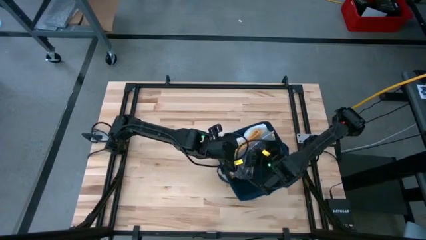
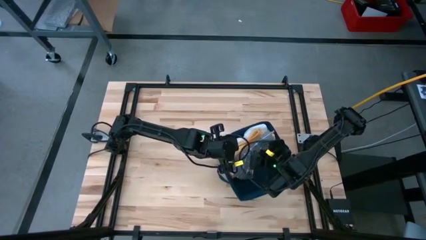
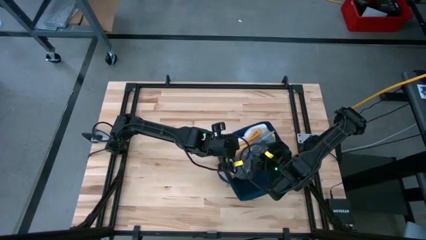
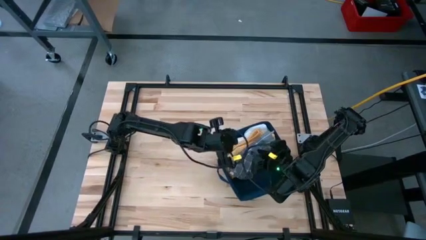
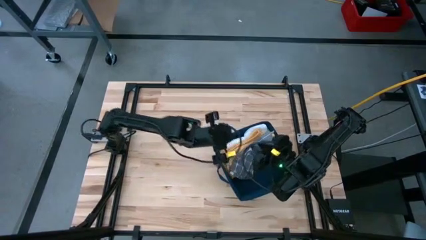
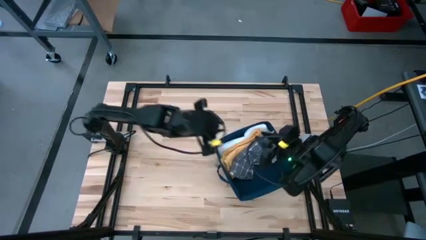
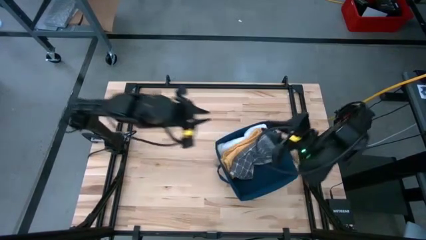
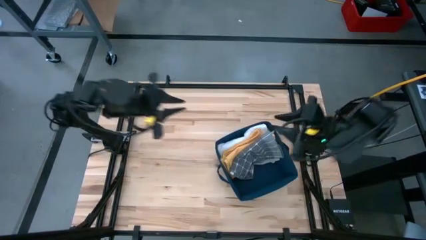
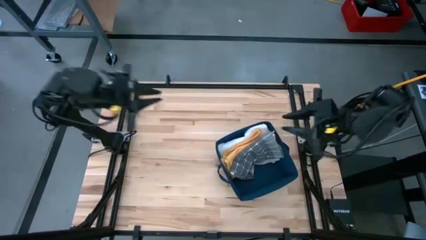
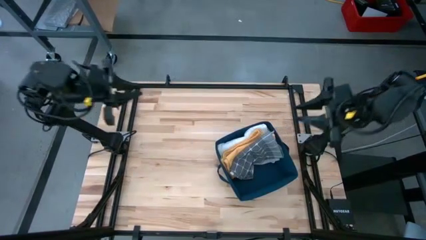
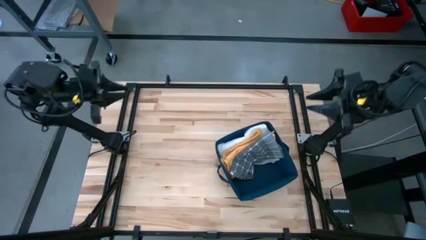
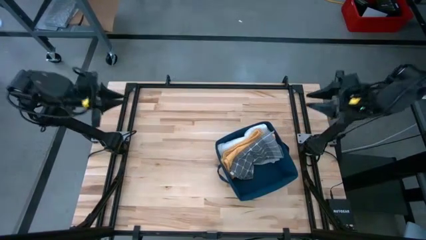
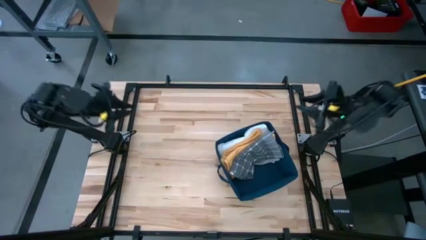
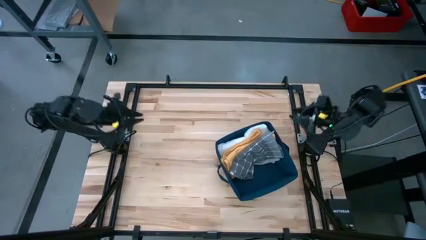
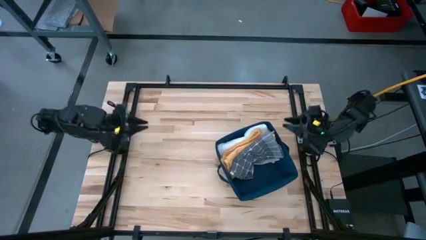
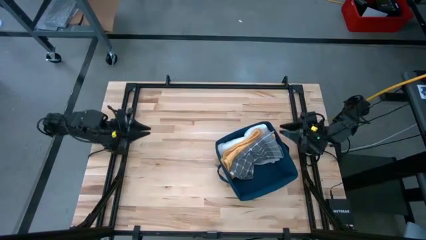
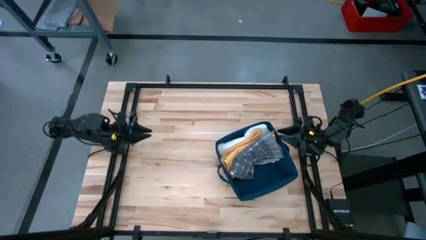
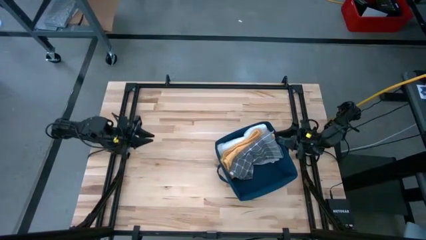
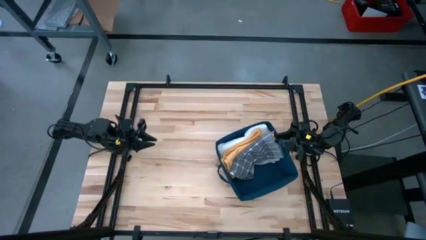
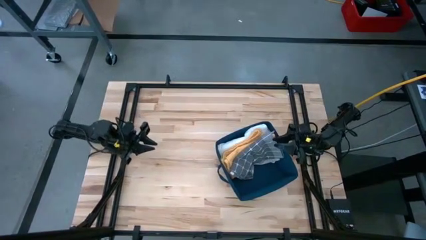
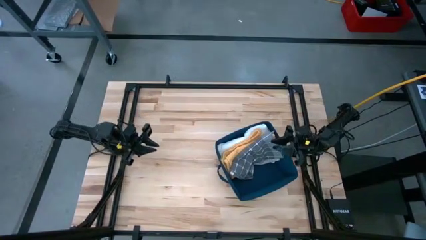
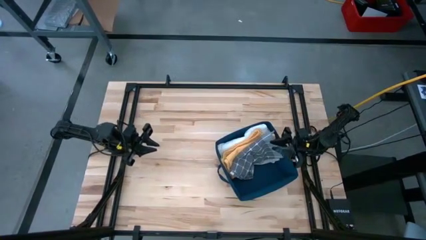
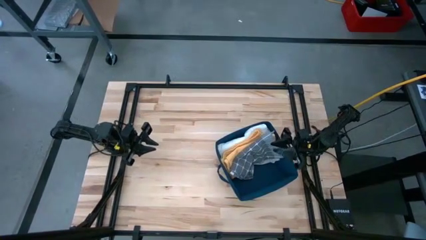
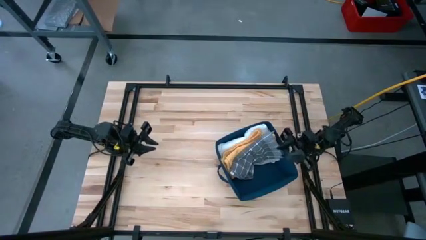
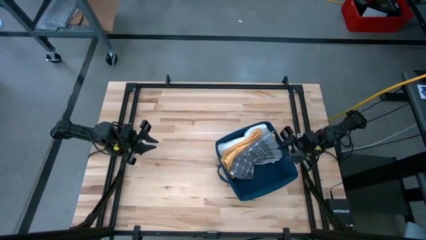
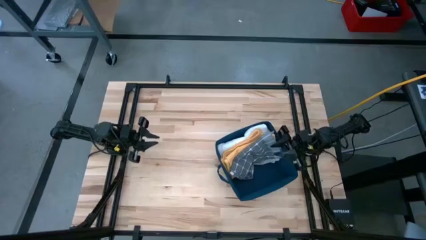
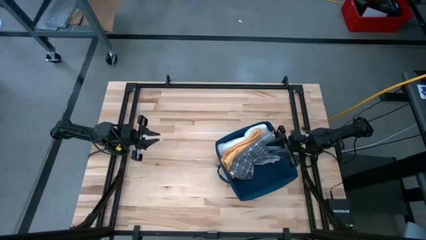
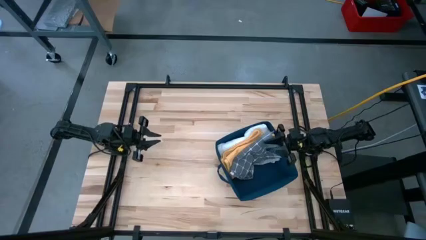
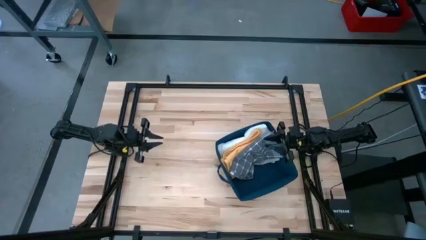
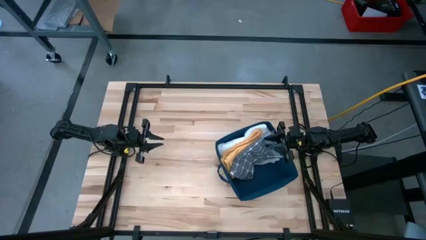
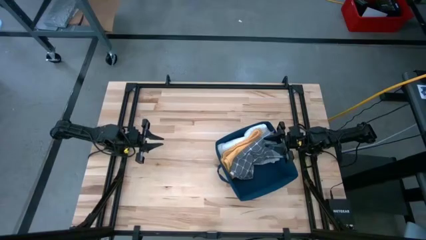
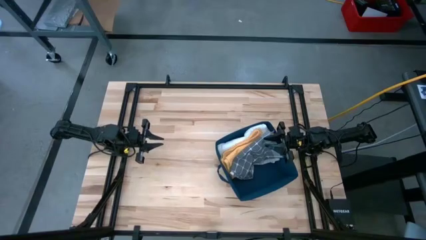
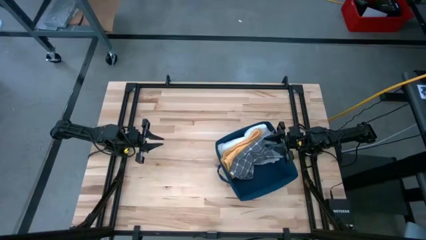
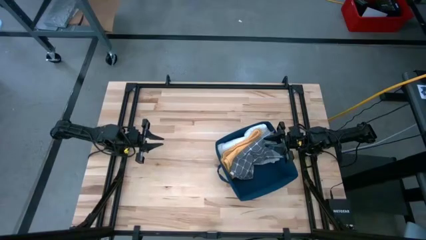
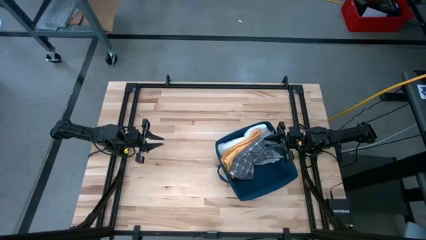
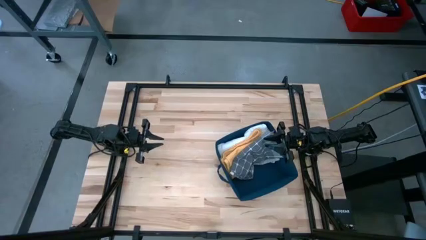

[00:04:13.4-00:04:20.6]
Task: Fold towel
Return to Home Position

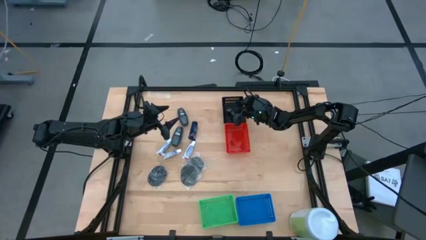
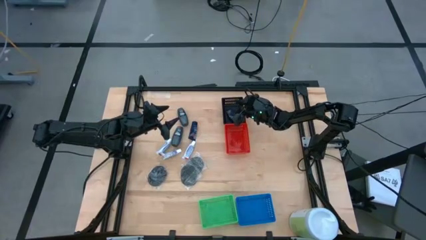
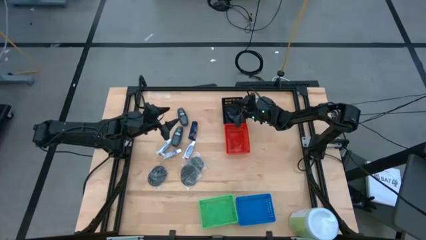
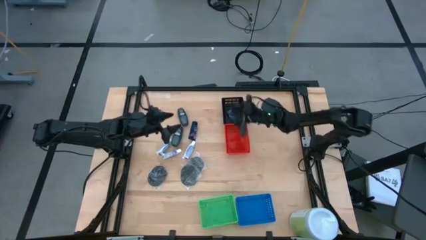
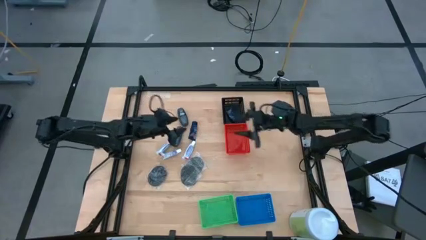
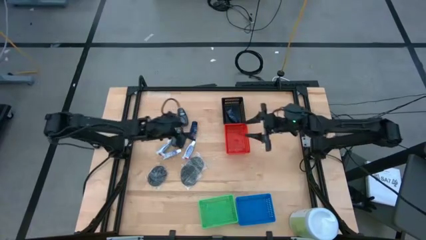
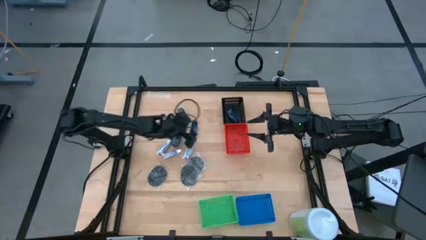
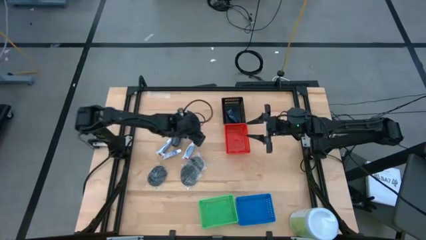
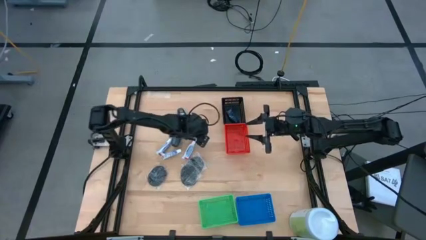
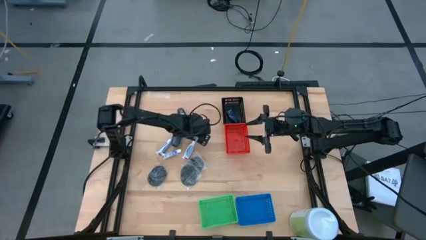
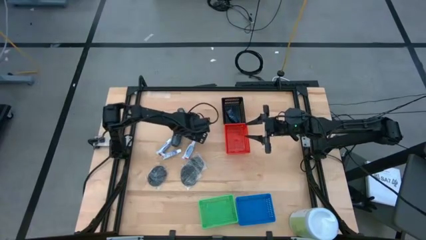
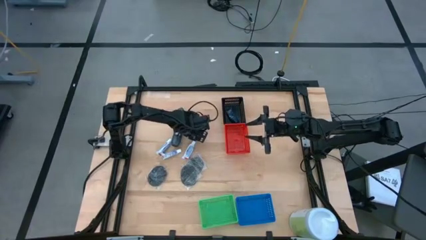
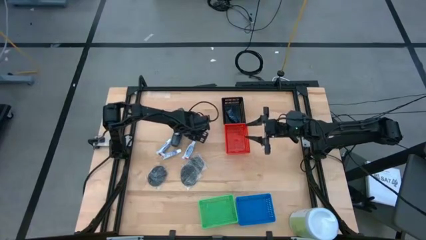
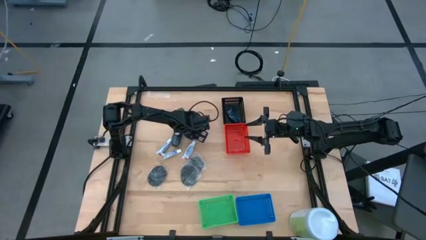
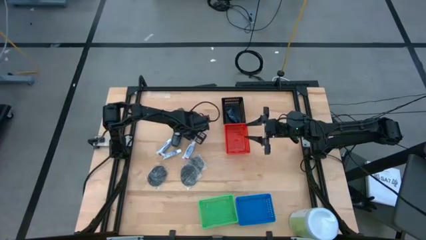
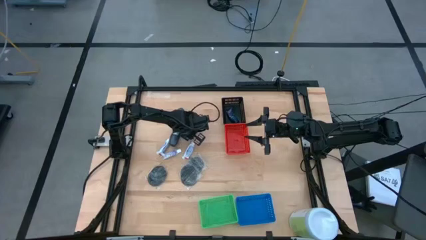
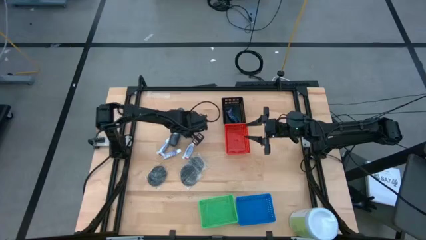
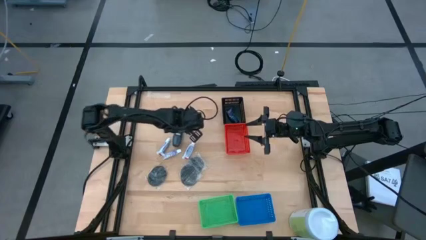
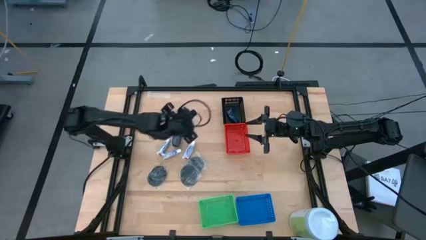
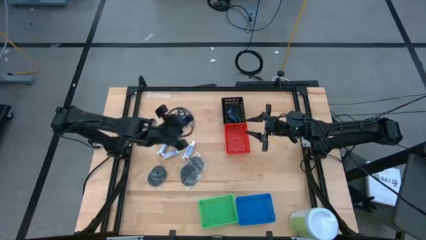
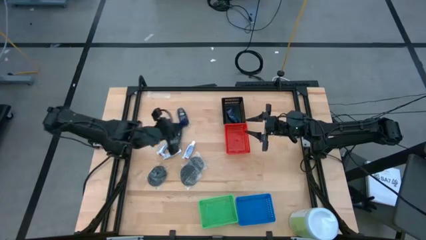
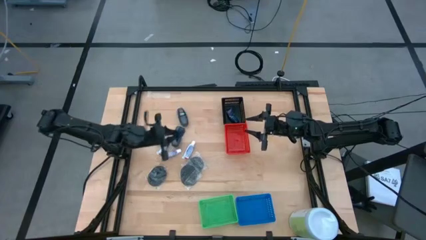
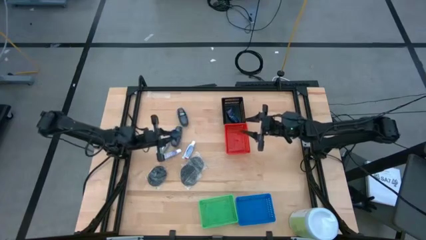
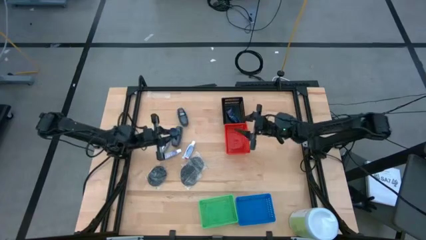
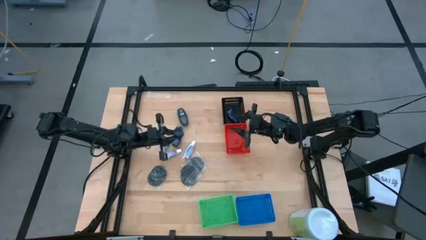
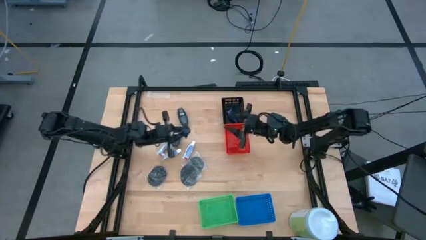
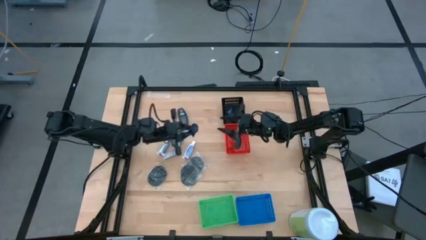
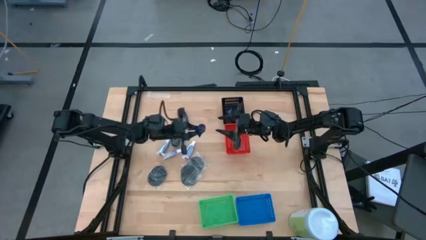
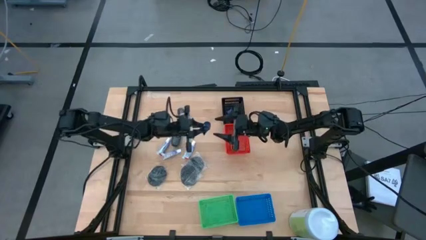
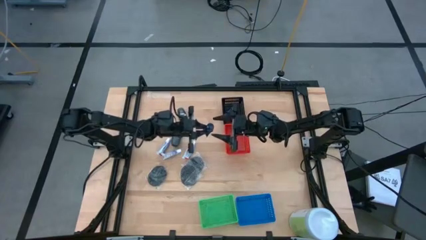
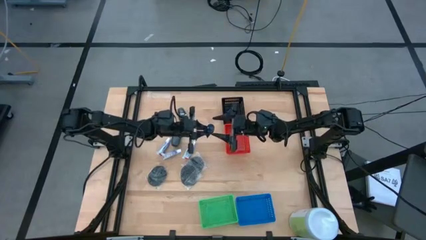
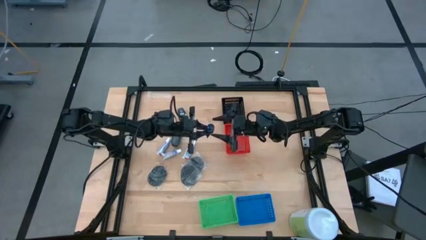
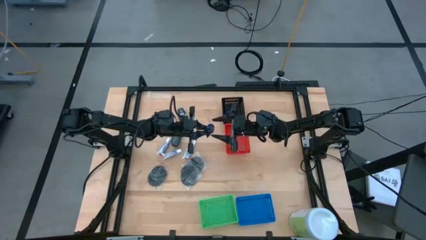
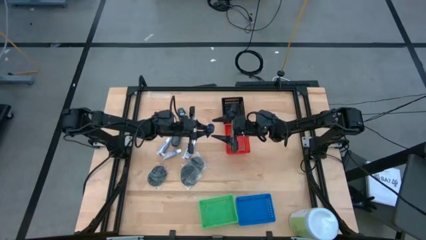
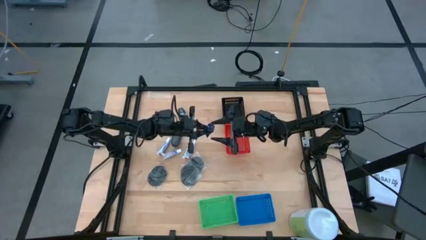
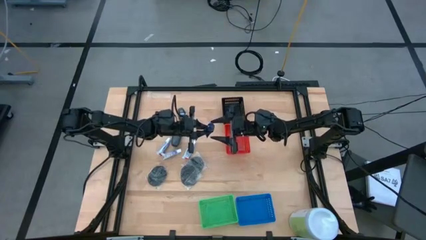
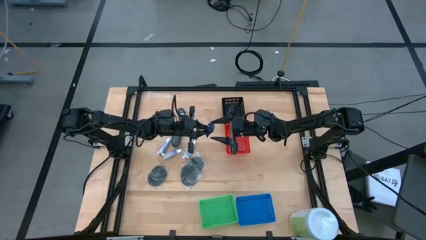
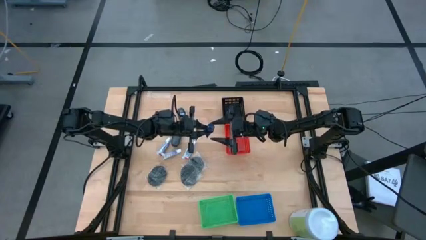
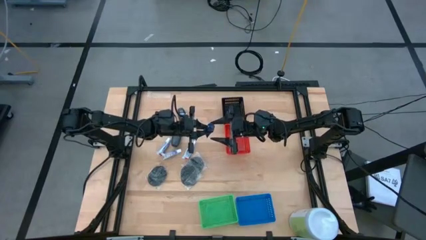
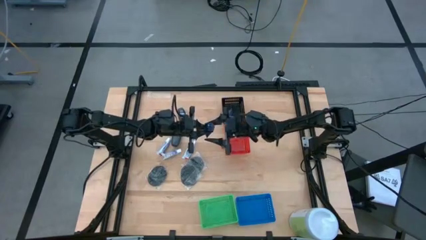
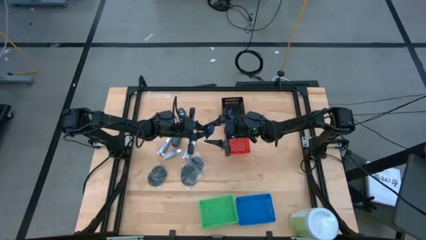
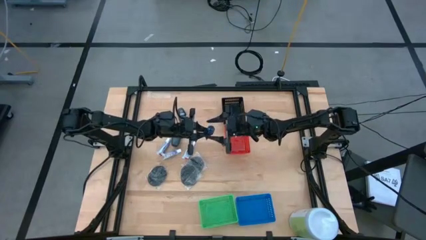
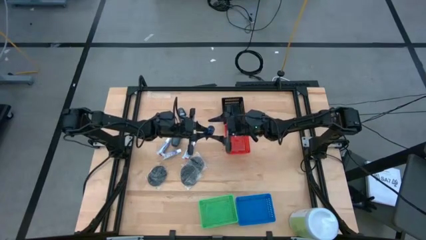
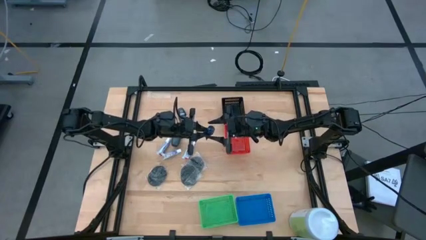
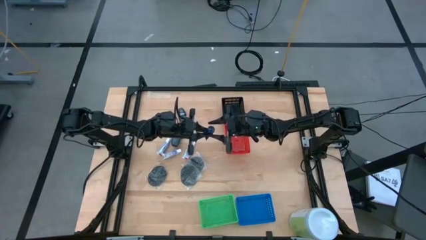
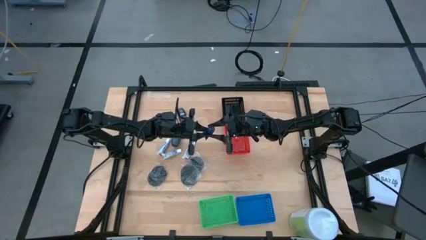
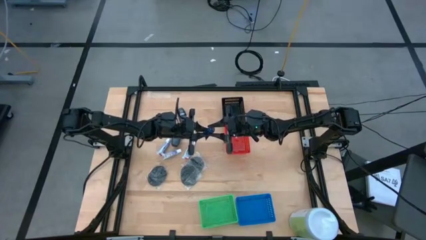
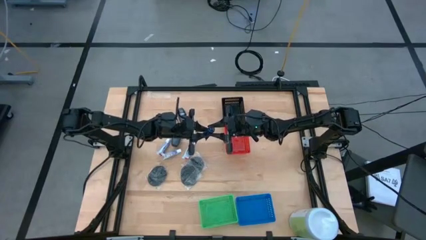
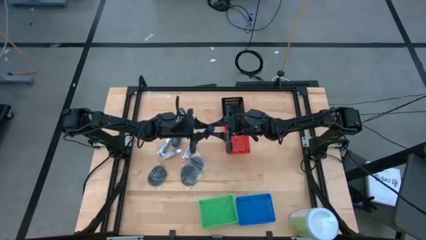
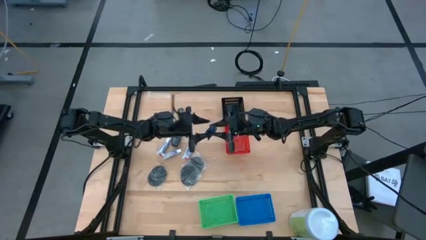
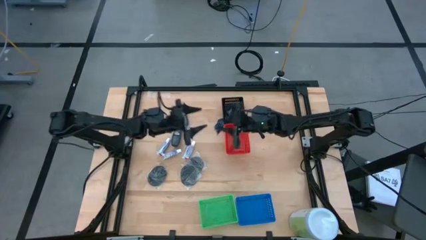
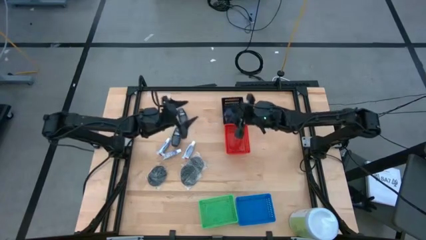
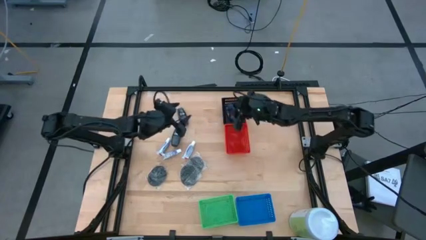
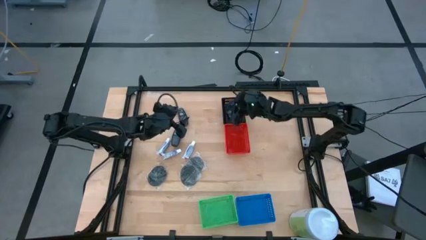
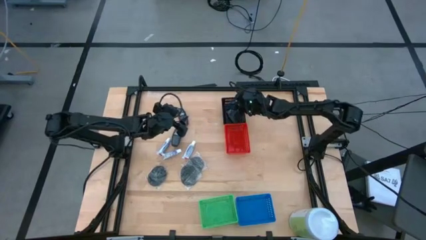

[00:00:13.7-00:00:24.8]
Task: Pick & Place Travel size toiletries
Put the dark blue shaving cream into the black bin
